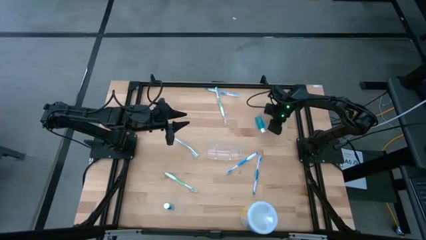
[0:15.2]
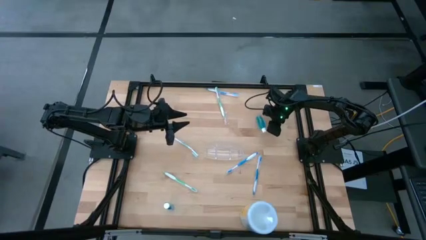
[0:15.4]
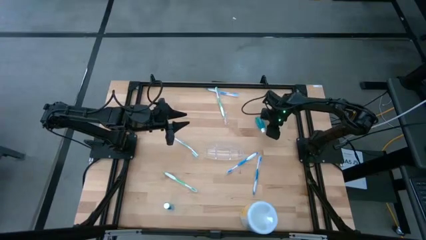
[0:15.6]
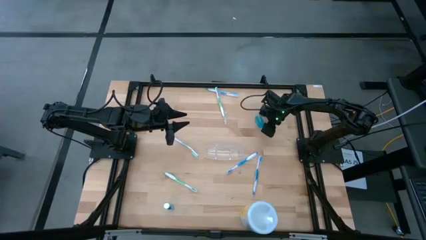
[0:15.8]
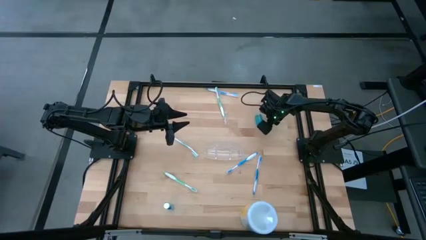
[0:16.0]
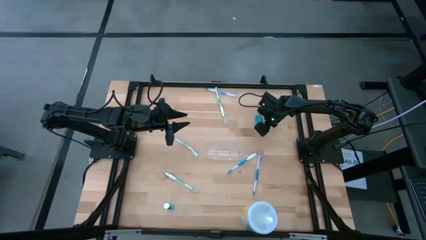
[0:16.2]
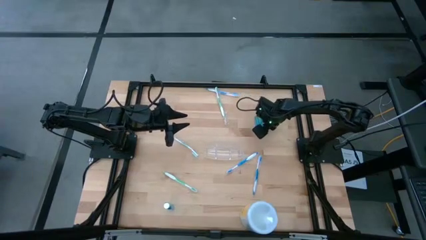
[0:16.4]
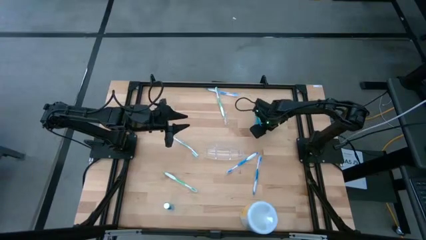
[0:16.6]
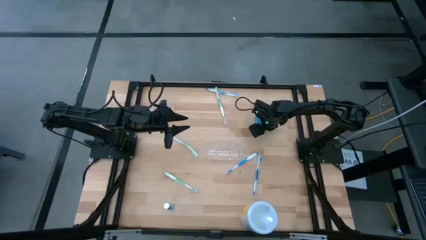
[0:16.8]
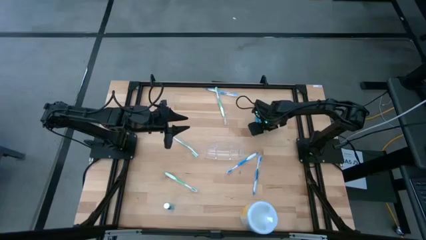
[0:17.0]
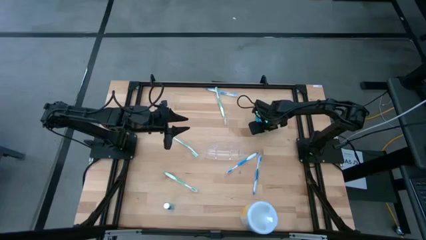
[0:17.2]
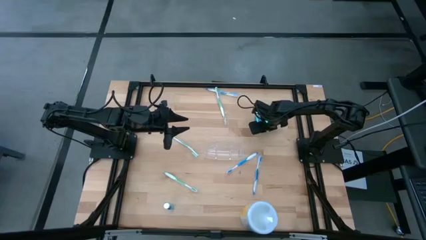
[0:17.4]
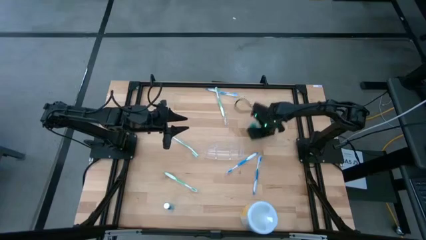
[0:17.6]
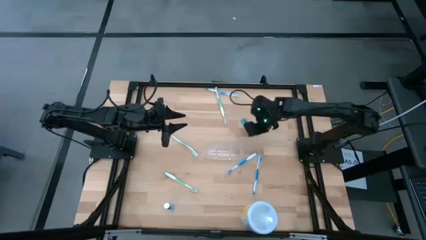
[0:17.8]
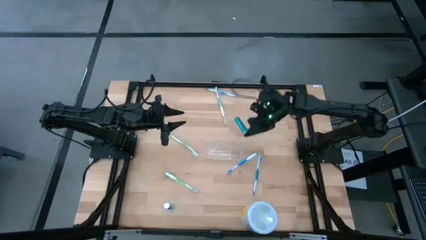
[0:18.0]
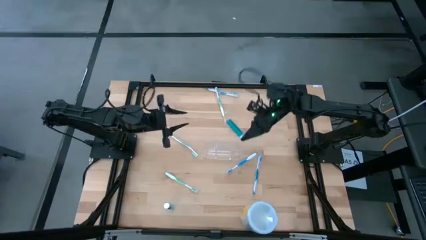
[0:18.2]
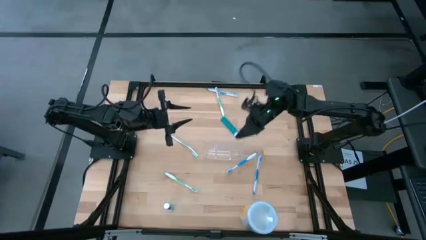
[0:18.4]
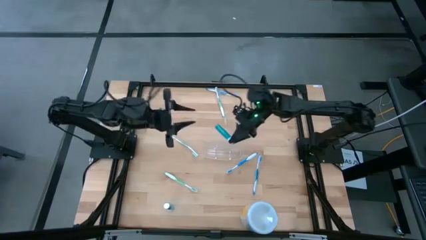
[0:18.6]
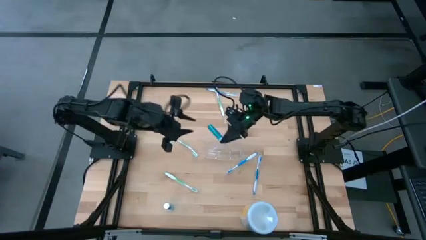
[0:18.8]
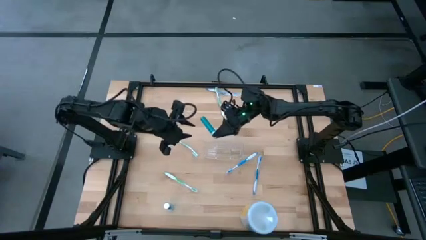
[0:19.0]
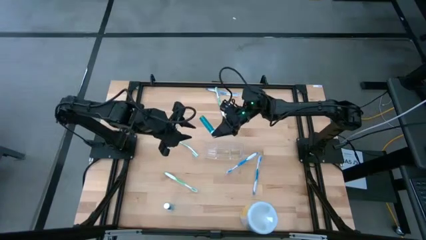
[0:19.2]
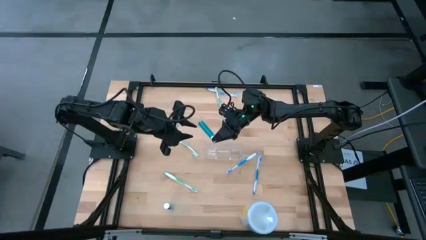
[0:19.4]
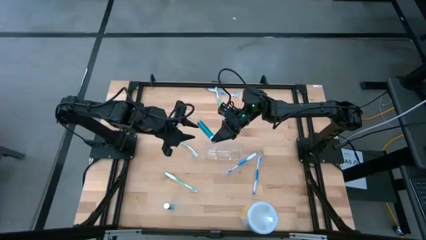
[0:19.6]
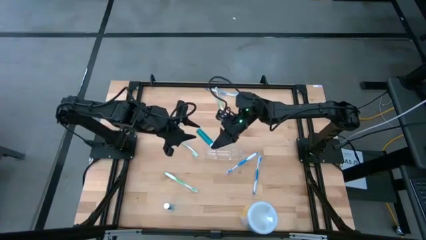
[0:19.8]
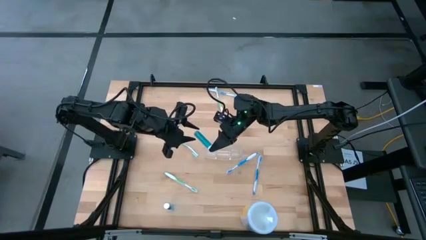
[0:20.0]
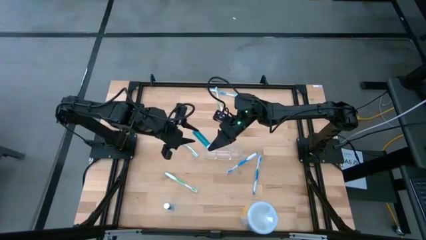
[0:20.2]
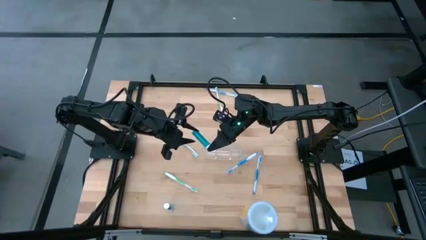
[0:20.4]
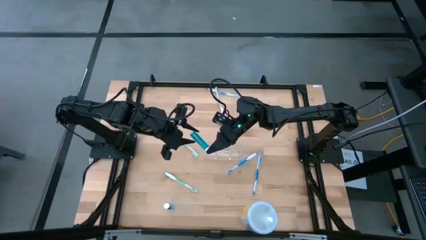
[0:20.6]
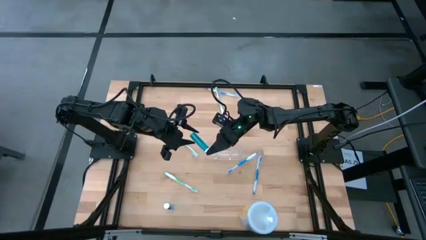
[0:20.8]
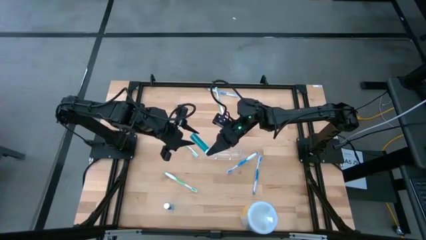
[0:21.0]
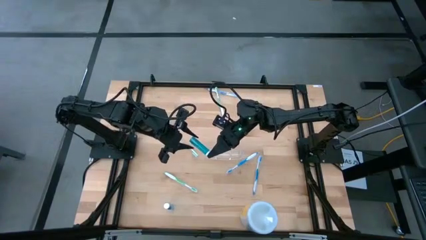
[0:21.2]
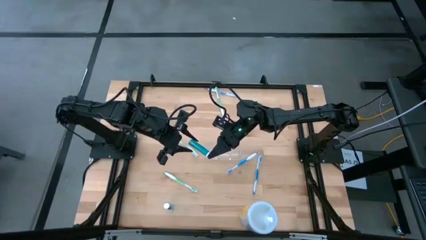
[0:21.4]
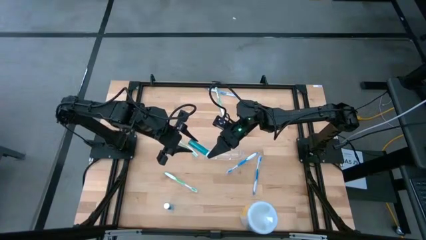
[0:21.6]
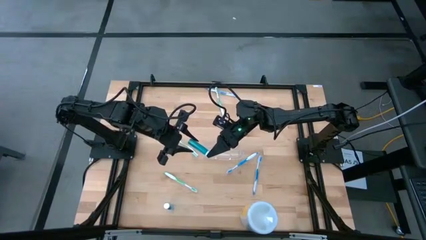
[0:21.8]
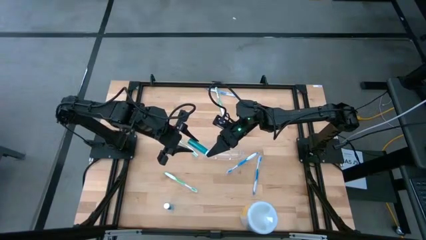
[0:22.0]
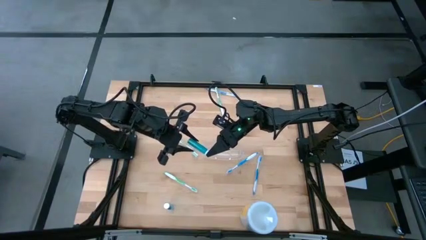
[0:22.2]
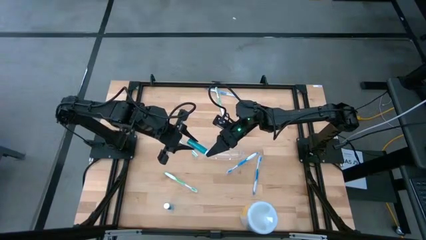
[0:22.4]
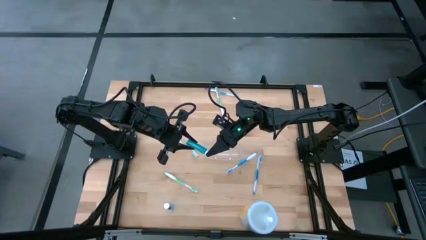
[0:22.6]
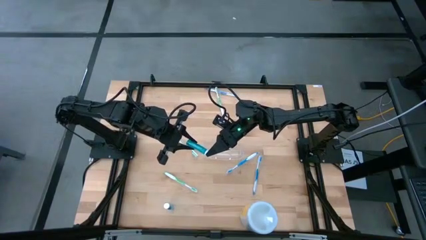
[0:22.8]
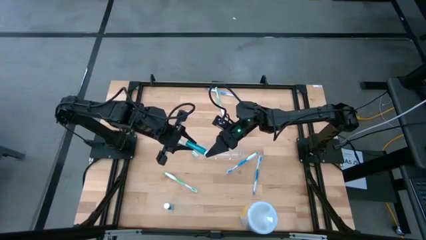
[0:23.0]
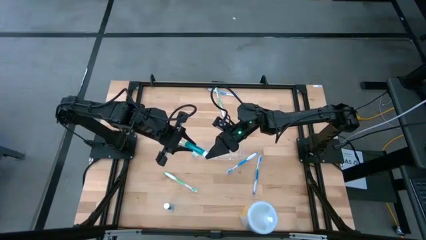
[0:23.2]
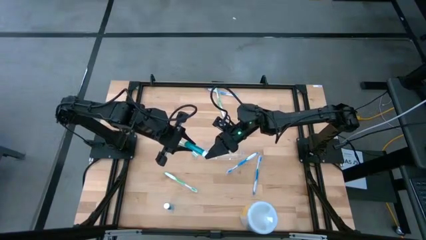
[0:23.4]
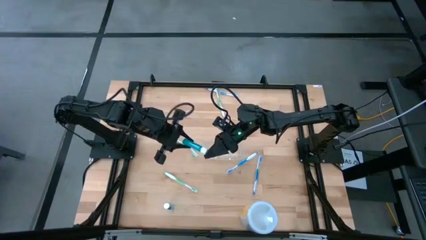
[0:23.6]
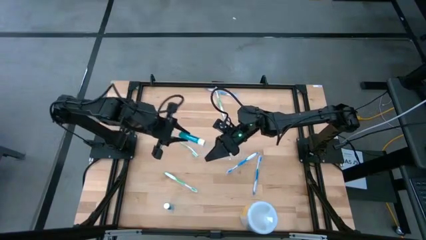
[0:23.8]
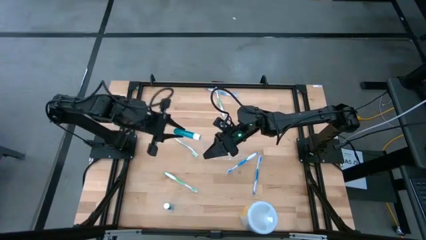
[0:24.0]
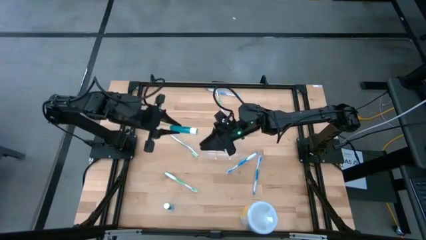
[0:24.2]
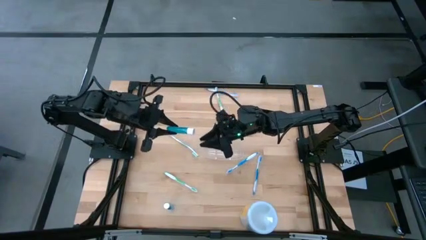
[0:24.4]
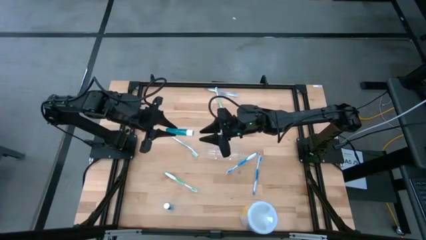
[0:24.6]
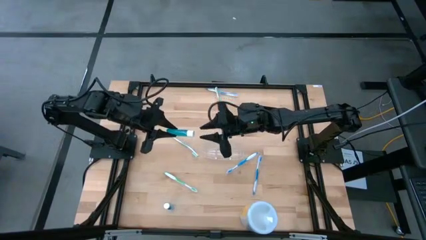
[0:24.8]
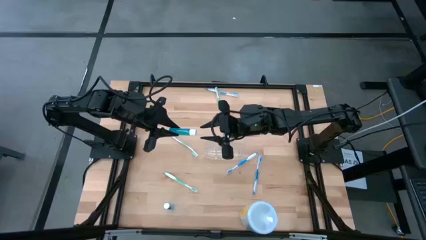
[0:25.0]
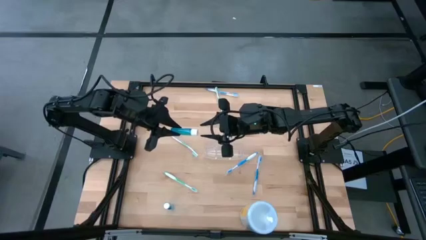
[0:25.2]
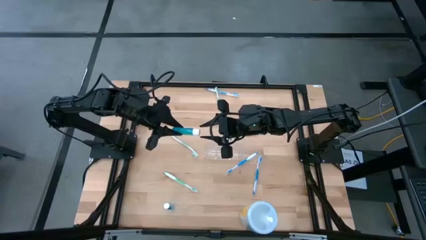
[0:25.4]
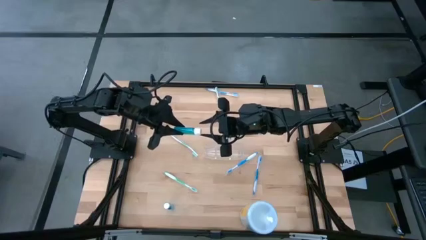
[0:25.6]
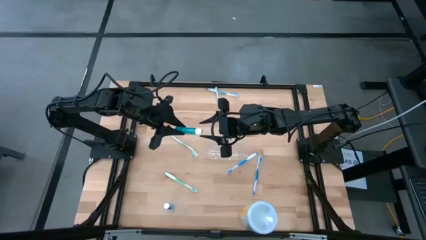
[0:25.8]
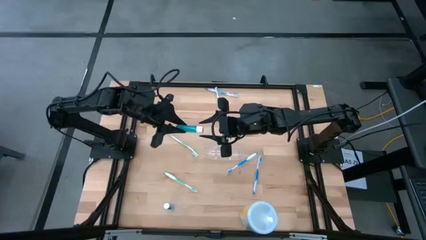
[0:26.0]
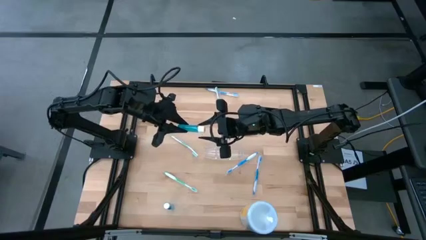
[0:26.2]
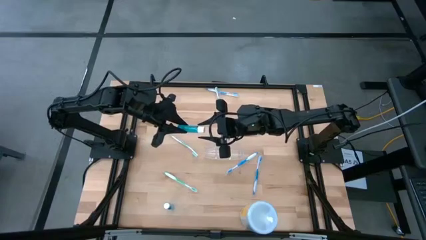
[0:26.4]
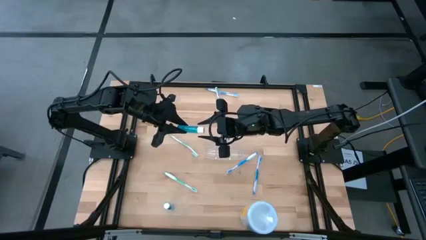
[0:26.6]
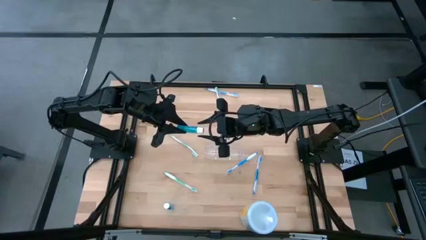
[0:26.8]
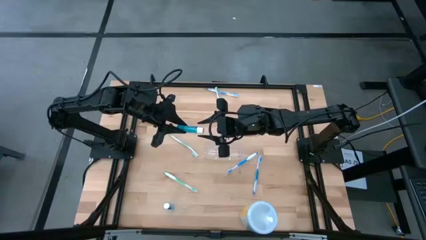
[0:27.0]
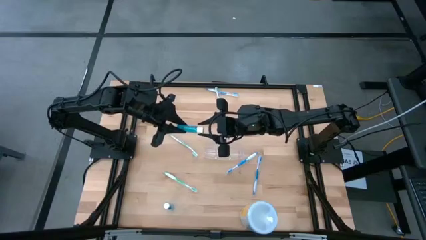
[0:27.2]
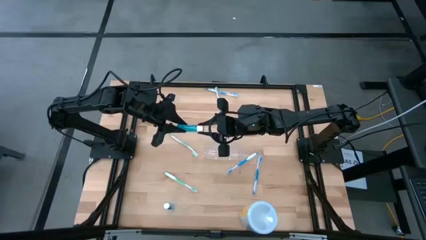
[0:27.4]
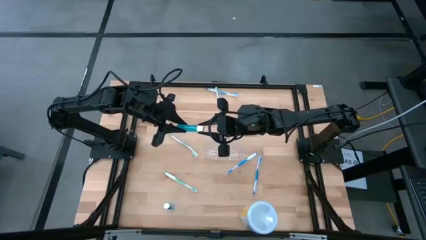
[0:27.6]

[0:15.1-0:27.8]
Task: Pick & Place toothbrushing station
Put the top blue mouthwash into the transparent organizer
